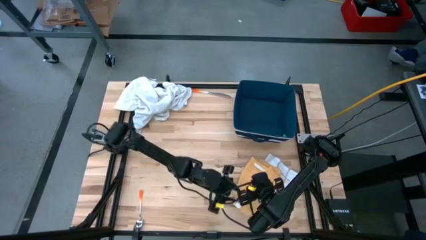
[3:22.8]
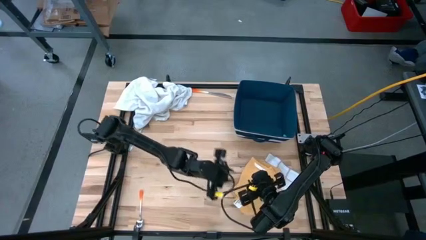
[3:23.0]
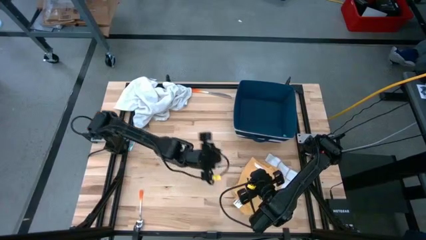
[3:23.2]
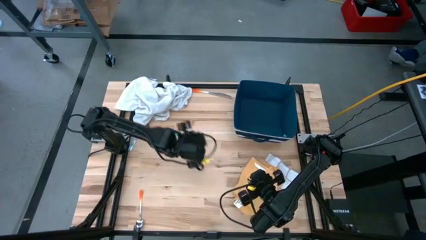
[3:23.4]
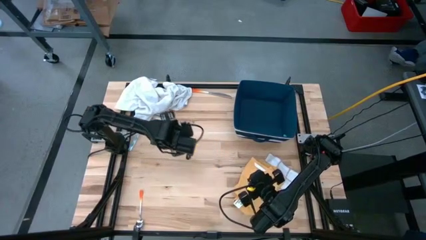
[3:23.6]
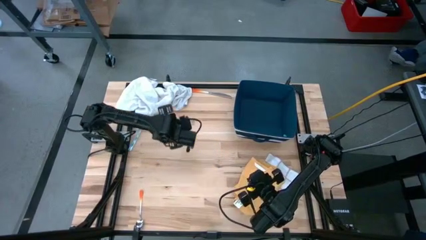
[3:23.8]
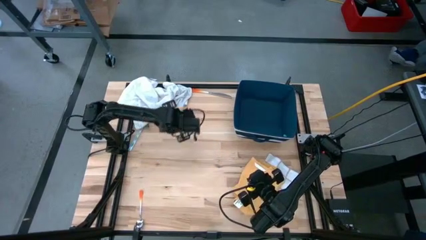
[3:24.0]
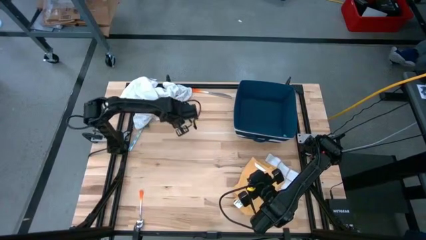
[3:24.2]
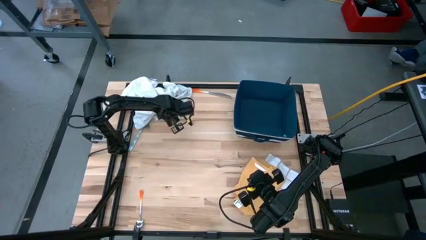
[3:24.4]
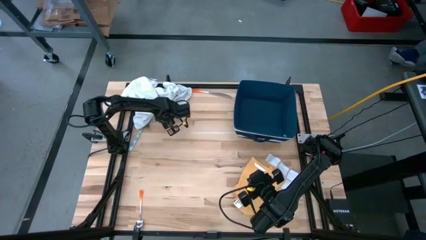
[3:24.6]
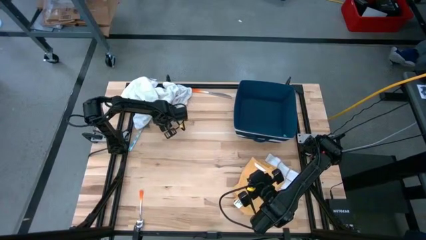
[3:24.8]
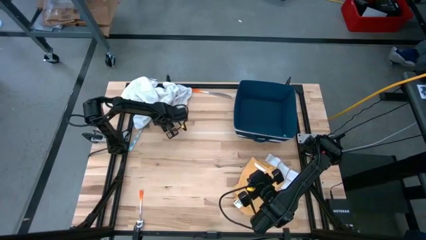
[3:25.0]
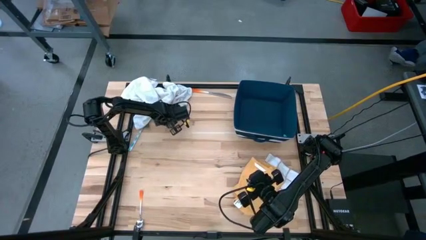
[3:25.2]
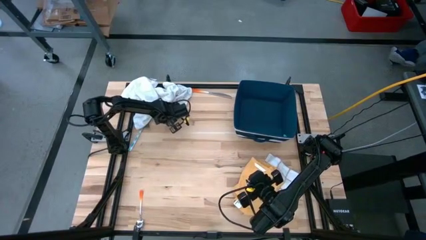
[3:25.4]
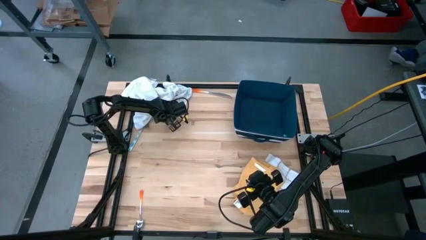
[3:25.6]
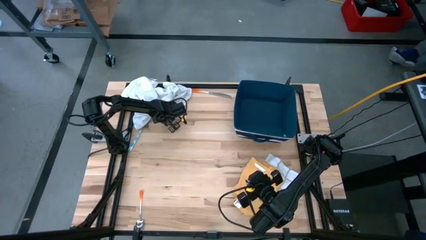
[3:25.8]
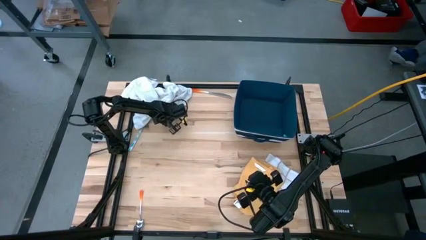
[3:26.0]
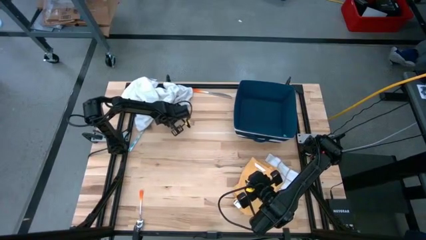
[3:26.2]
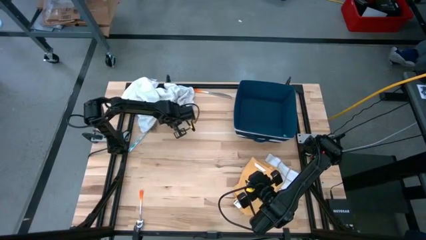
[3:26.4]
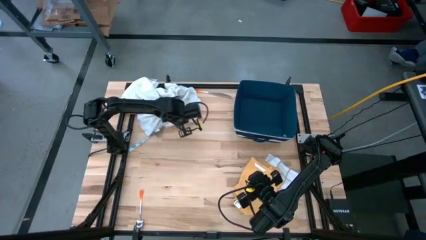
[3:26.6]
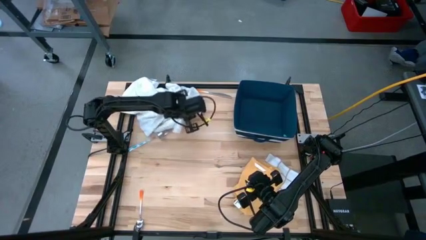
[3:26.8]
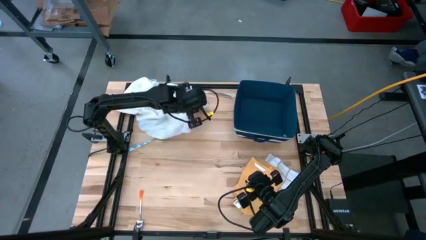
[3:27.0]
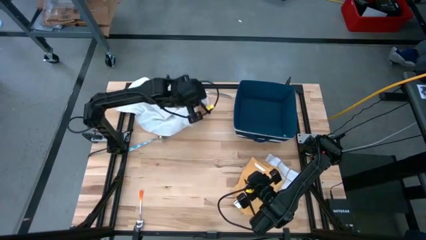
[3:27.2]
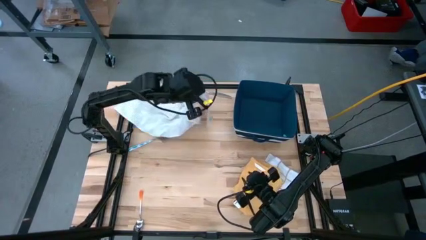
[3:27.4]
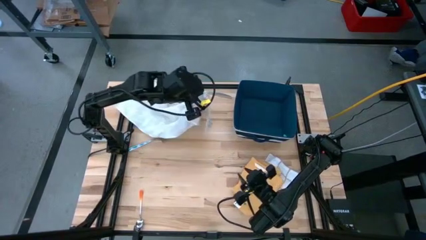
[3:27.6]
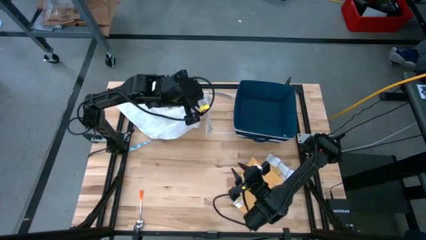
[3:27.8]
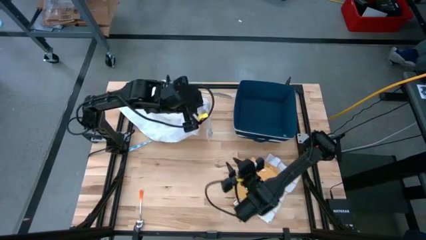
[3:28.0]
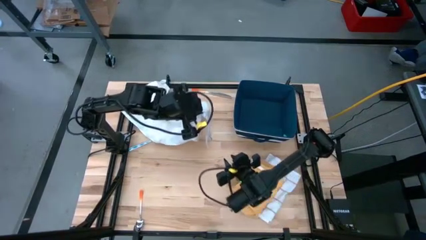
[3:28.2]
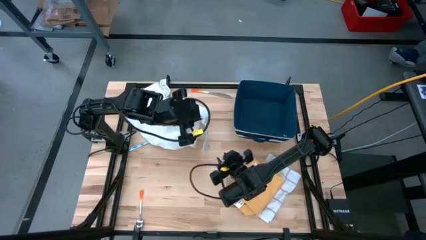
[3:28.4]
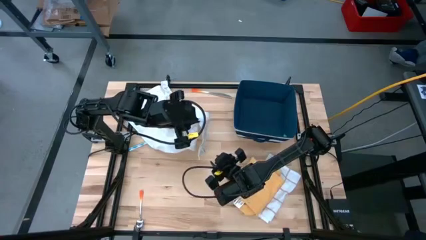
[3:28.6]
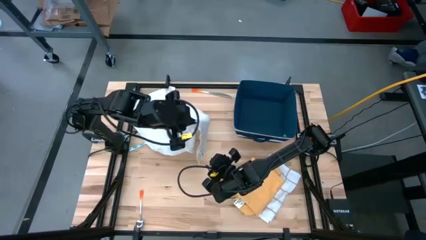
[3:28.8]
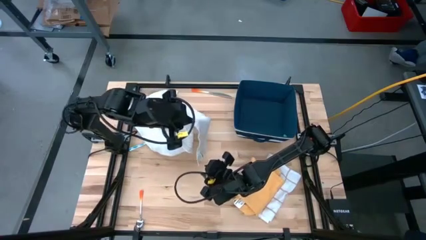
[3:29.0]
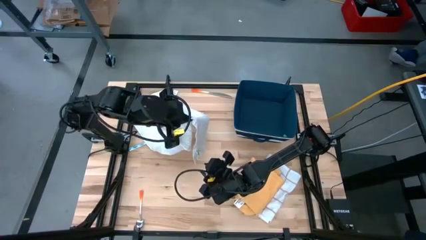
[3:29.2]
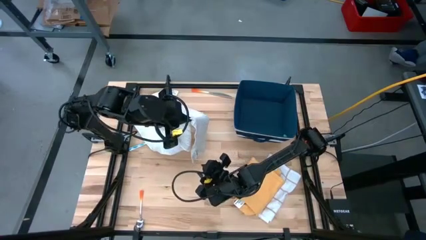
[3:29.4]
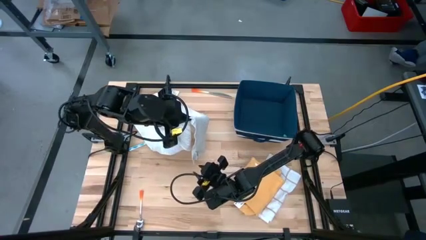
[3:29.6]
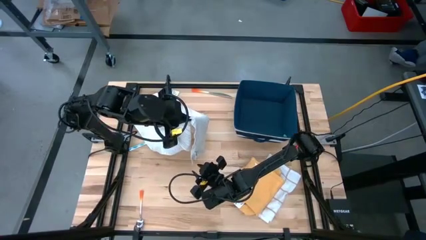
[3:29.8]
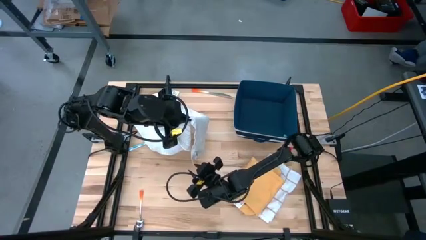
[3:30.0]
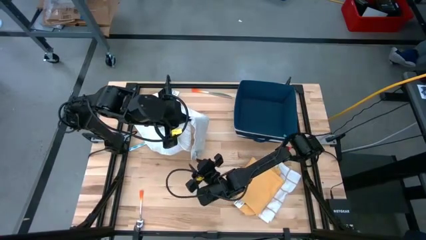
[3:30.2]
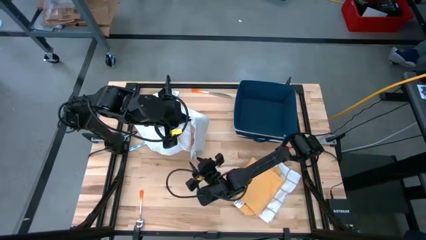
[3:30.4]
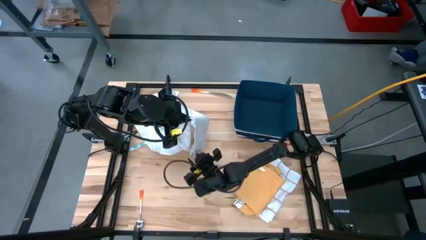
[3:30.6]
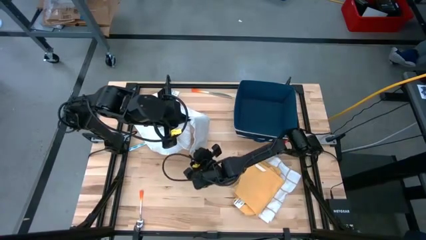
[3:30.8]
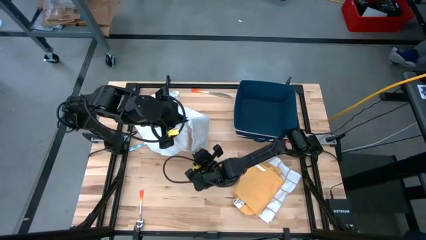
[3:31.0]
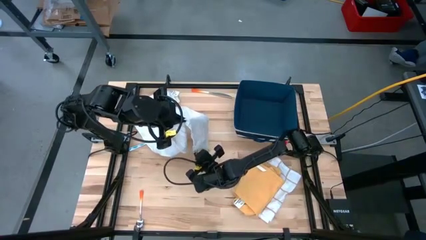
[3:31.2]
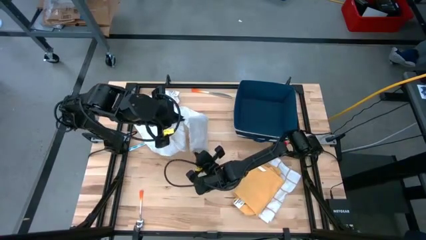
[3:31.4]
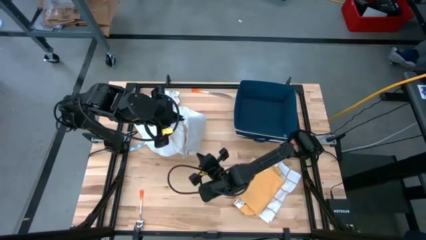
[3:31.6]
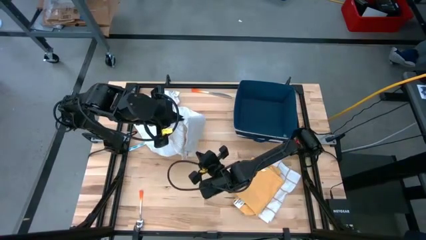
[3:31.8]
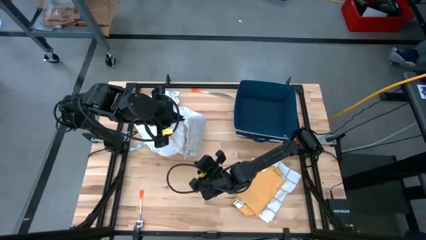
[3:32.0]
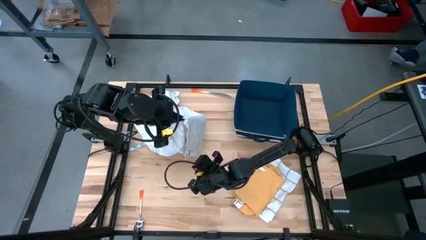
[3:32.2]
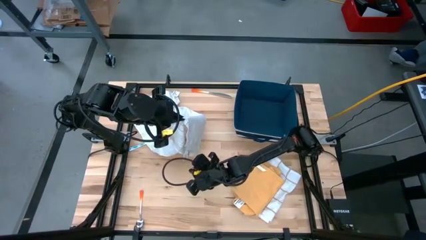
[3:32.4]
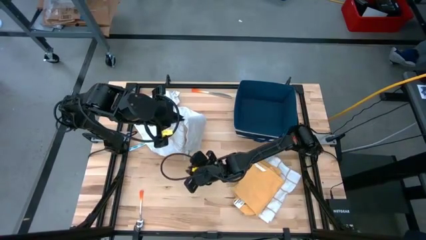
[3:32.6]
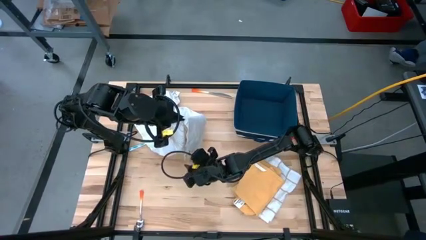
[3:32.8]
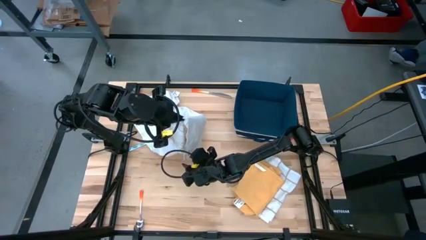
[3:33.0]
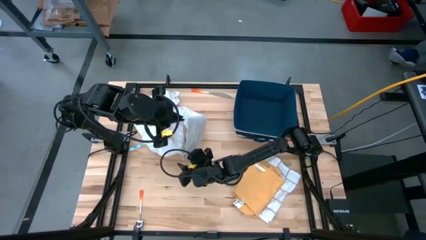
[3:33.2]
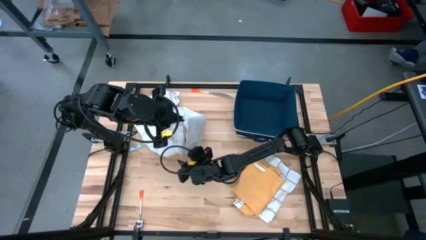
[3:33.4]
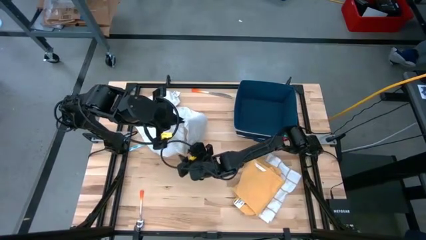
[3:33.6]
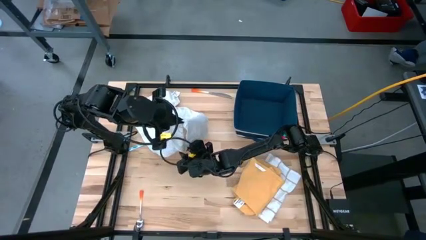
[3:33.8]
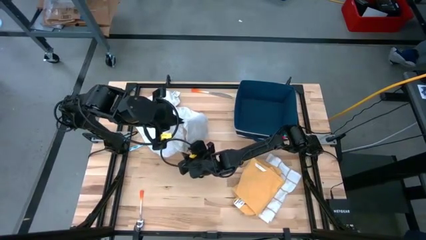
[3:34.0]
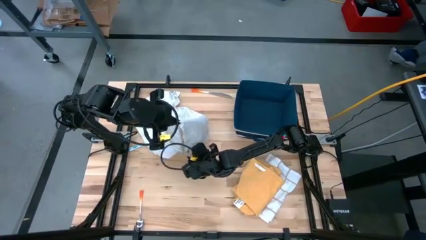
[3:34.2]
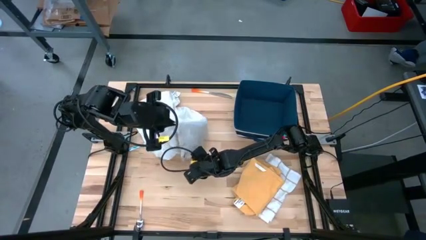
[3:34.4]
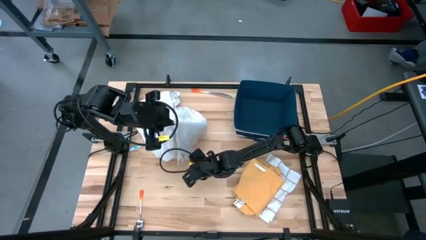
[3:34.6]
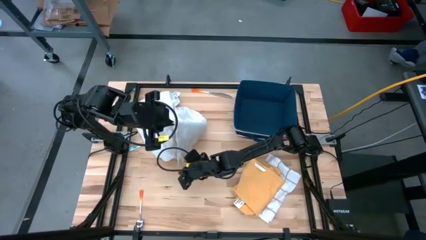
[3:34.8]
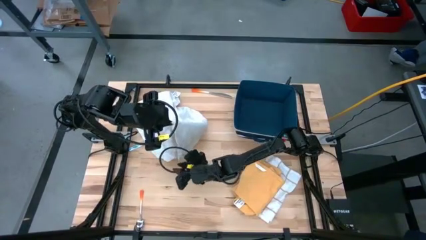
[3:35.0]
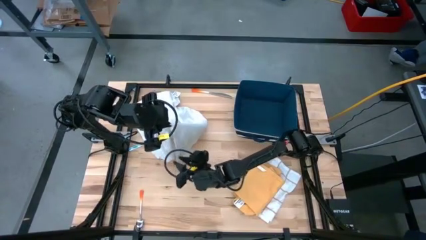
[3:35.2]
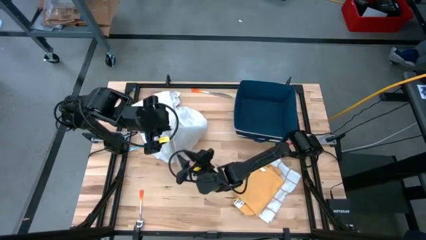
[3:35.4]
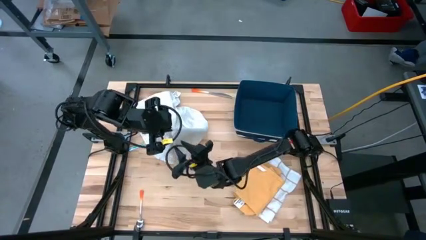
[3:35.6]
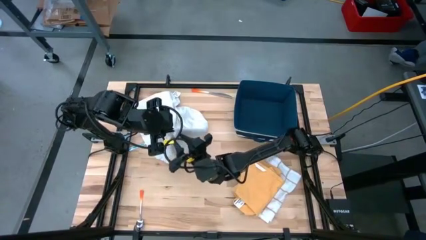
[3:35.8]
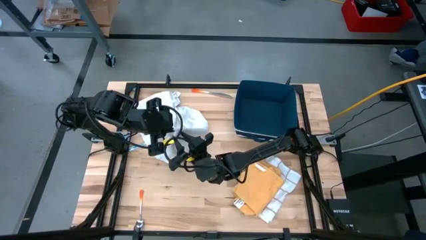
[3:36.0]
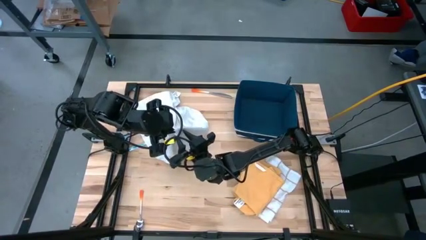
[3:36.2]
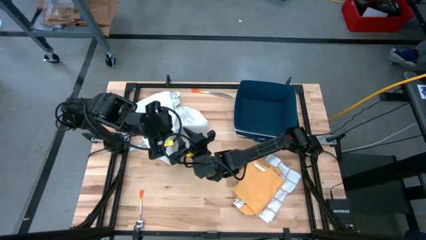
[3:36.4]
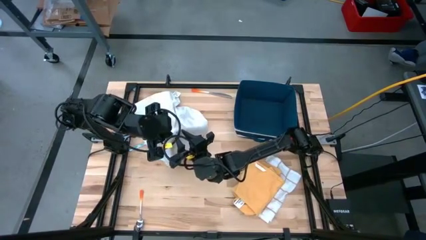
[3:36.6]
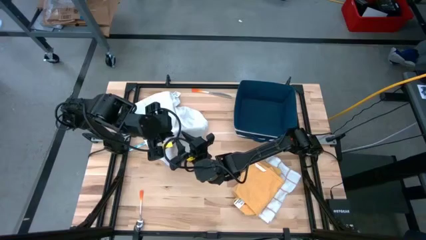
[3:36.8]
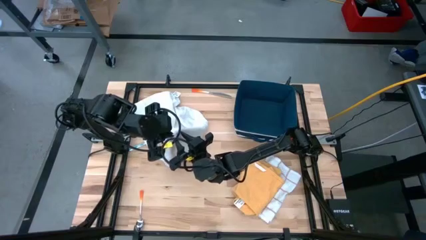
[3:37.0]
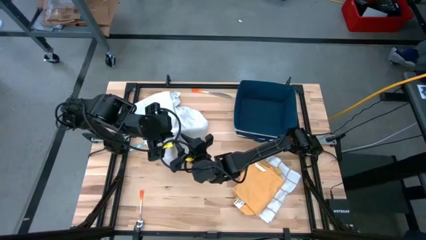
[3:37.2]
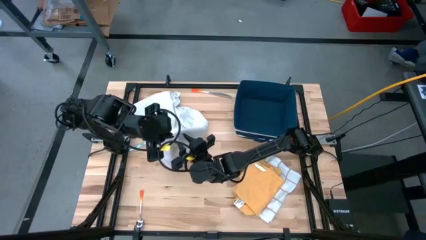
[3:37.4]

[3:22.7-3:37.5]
Task: Fold towel
Fold the white-and-gray checkered towel

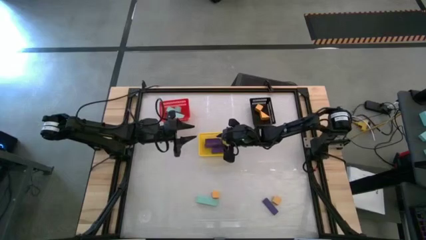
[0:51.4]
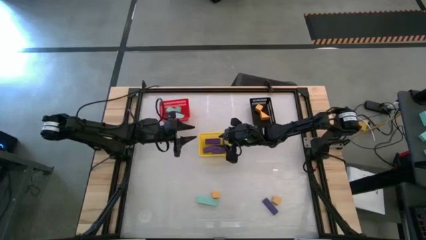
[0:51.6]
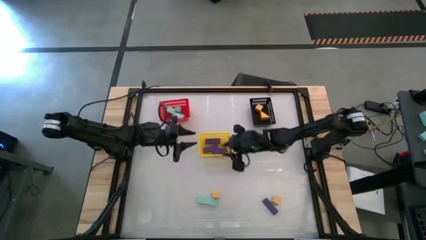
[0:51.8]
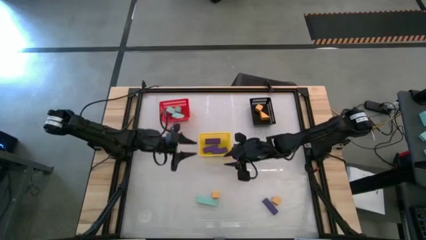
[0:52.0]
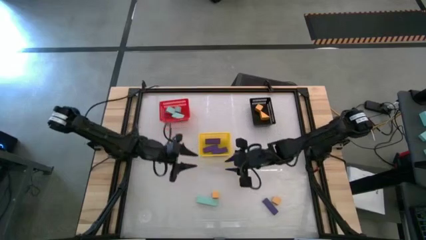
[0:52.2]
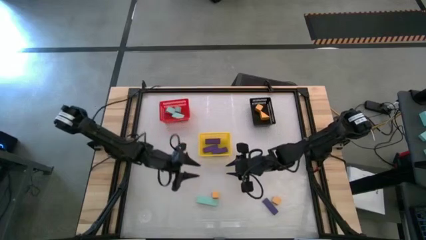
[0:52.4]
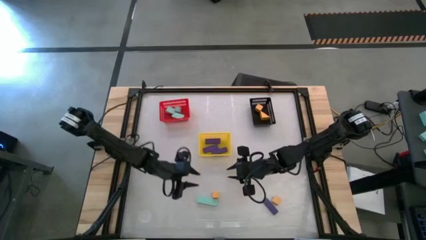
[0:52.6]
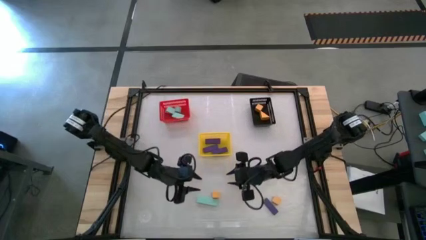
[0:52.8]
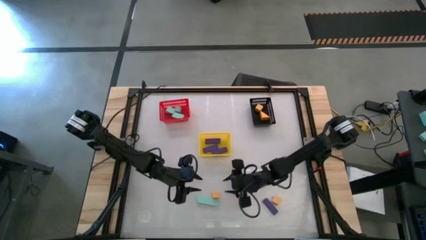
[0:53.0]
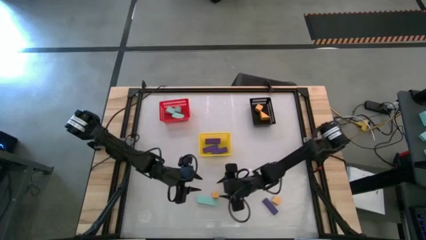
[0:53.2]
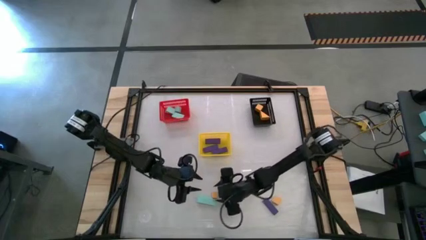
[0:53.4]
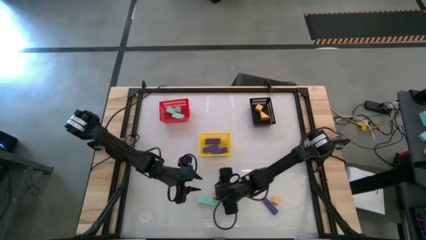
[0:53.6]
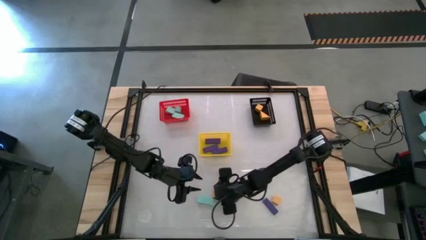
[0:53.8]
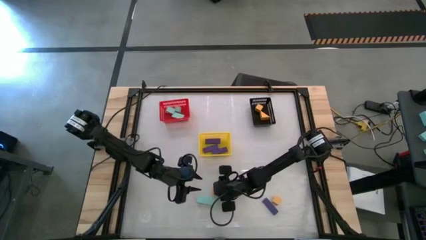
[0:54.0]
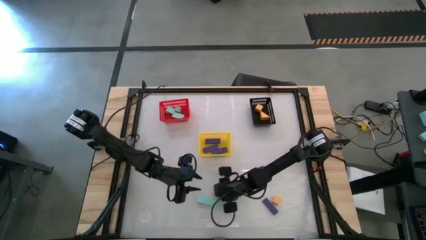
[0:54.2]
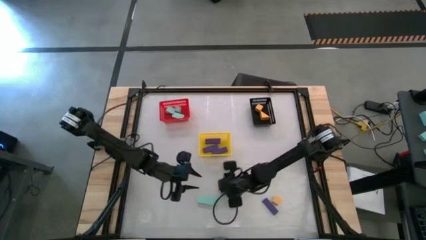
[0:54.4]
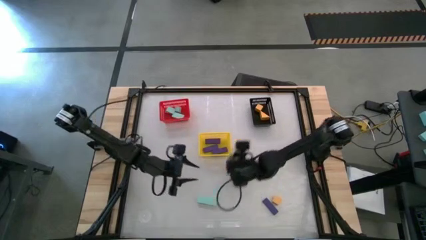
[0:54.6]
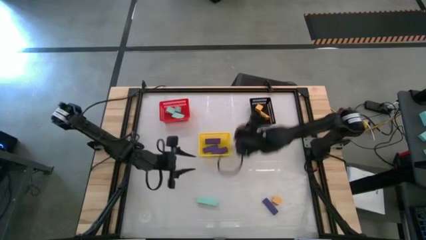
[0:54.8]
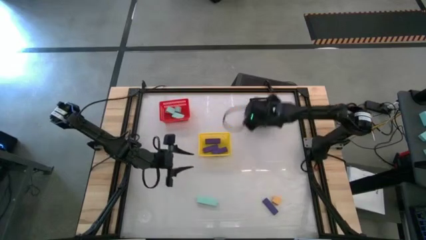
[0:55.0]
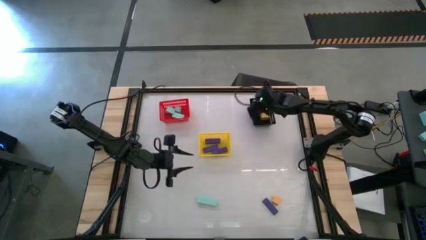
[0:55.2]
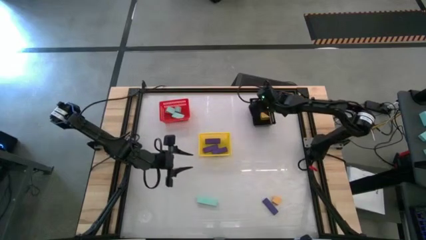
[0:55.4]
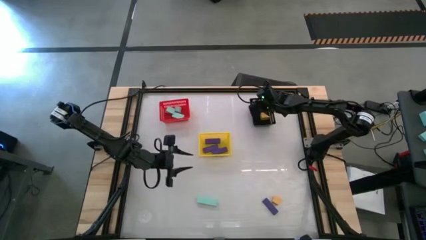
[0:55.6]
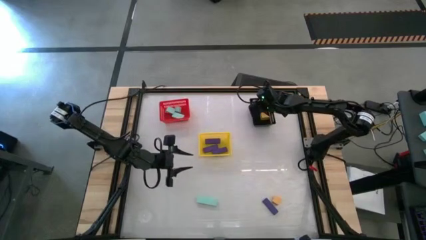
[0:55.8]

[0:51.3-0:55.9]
Task: Sort & place blocks by color
Put the orange block into the black bin
